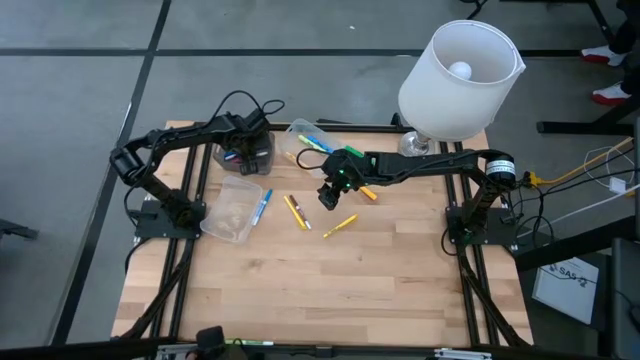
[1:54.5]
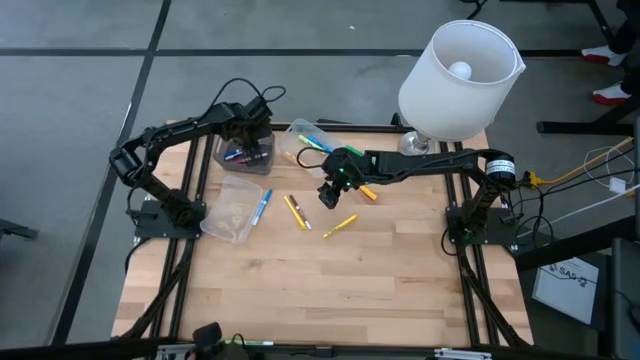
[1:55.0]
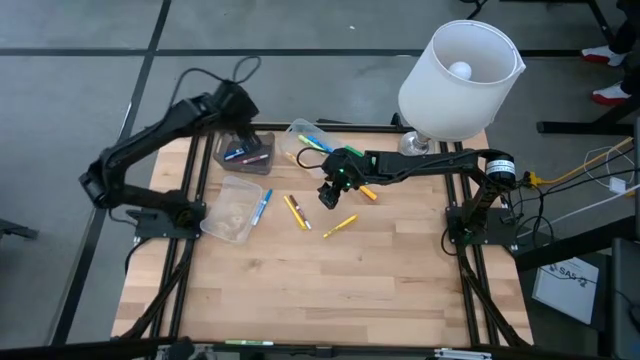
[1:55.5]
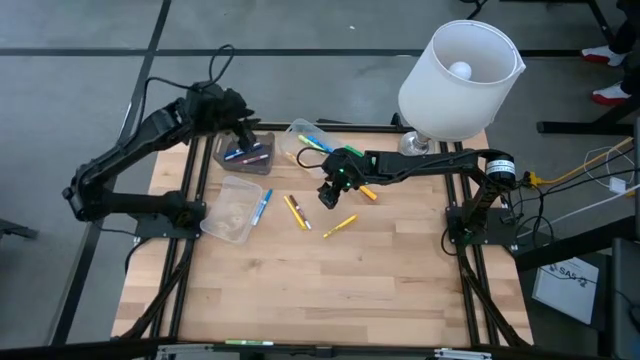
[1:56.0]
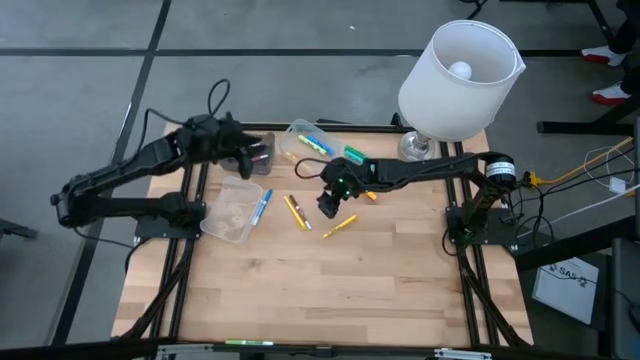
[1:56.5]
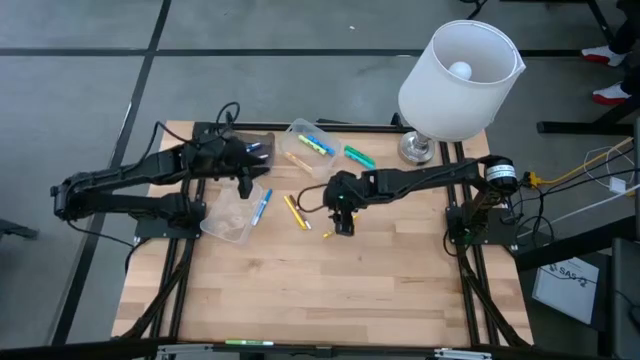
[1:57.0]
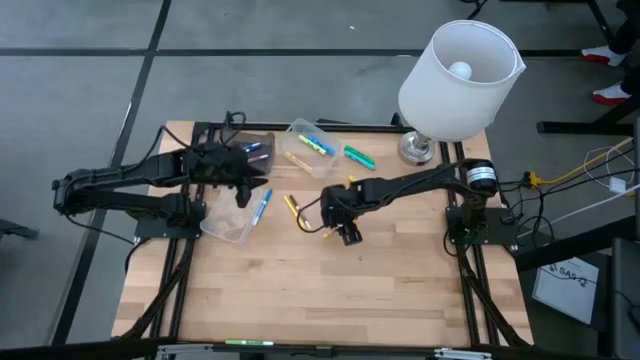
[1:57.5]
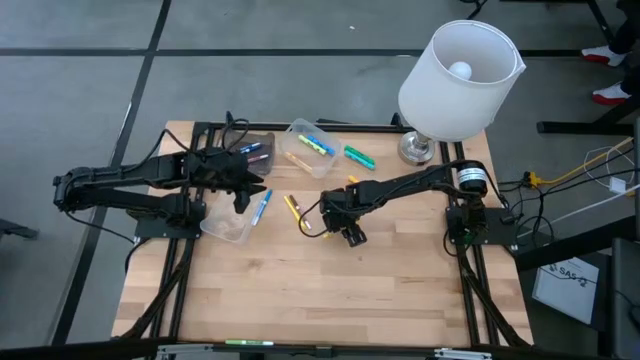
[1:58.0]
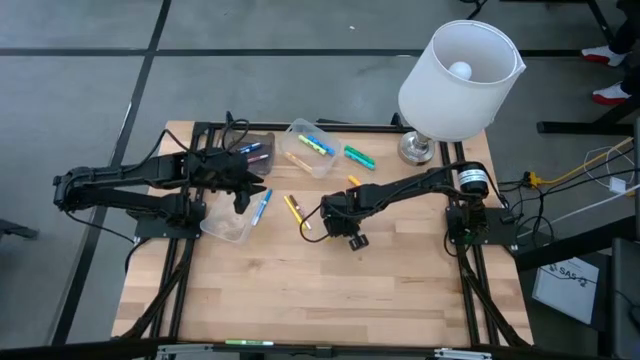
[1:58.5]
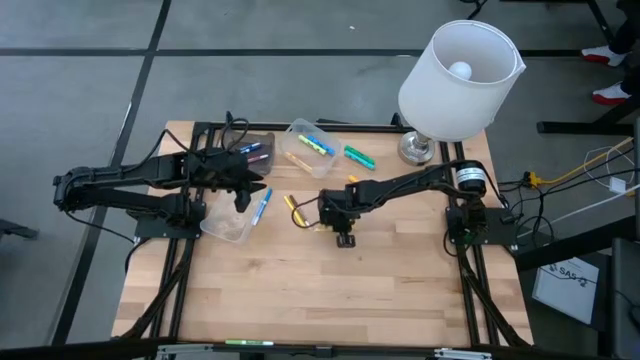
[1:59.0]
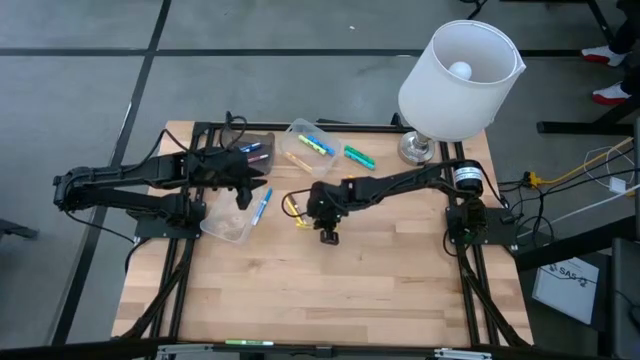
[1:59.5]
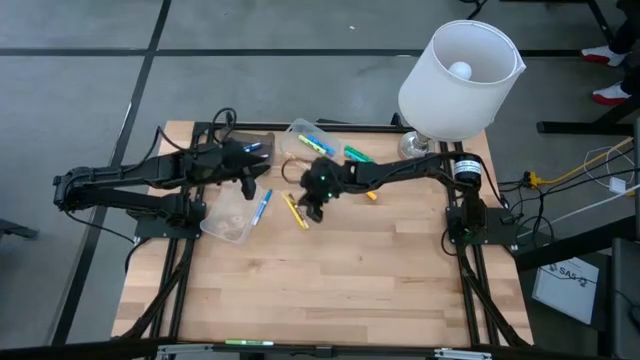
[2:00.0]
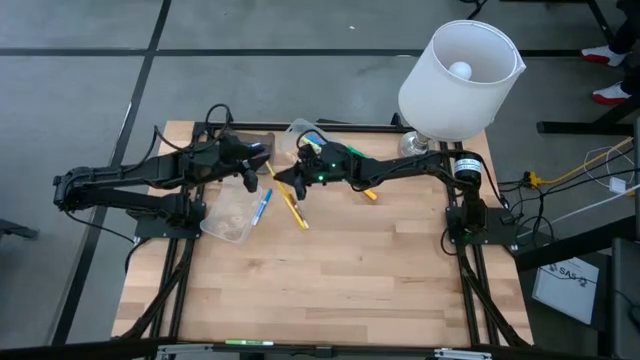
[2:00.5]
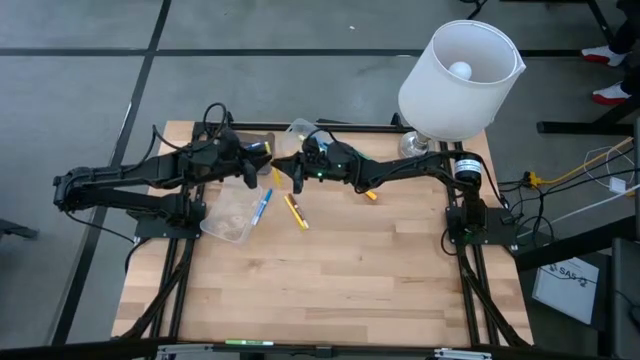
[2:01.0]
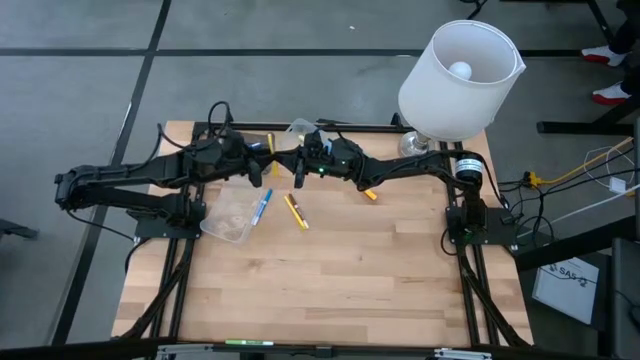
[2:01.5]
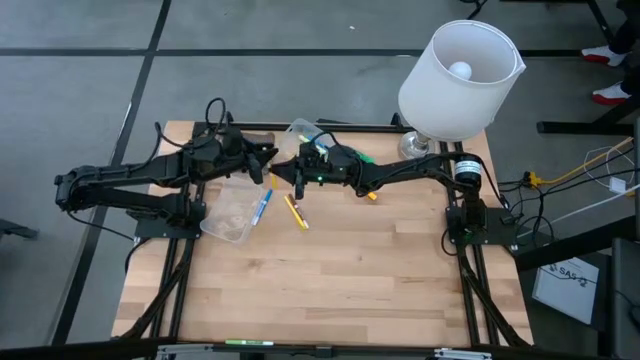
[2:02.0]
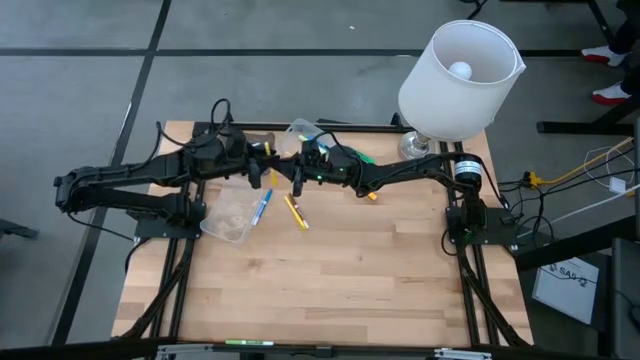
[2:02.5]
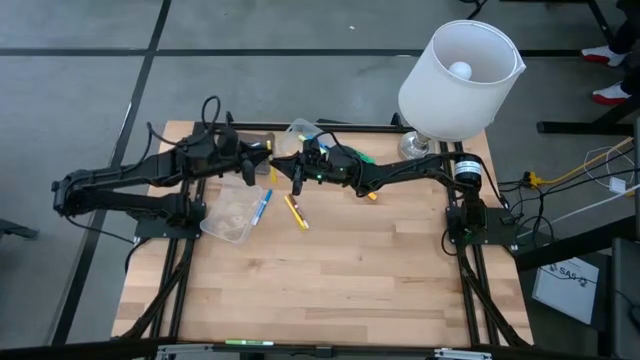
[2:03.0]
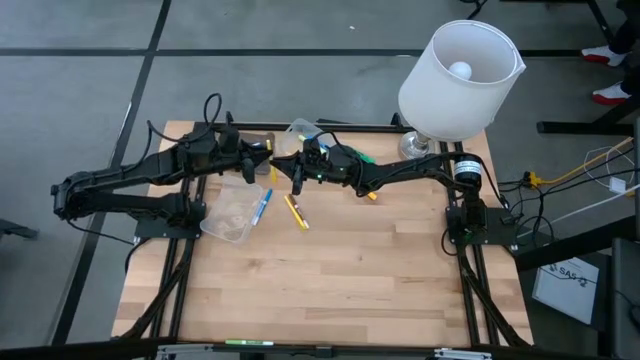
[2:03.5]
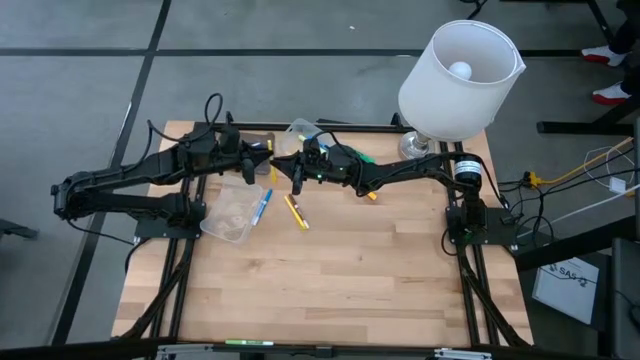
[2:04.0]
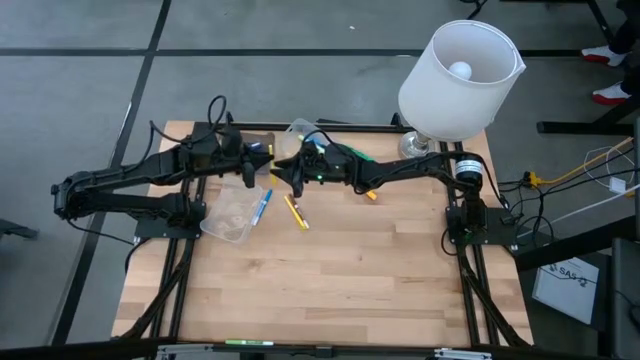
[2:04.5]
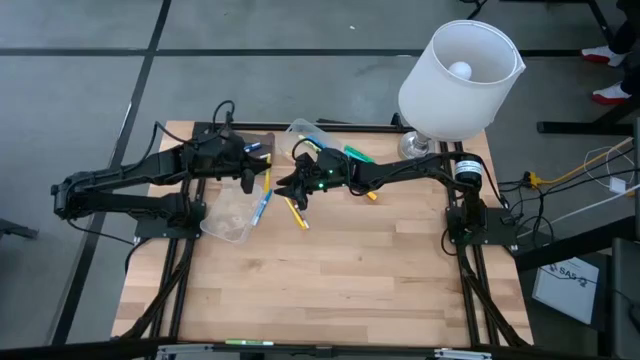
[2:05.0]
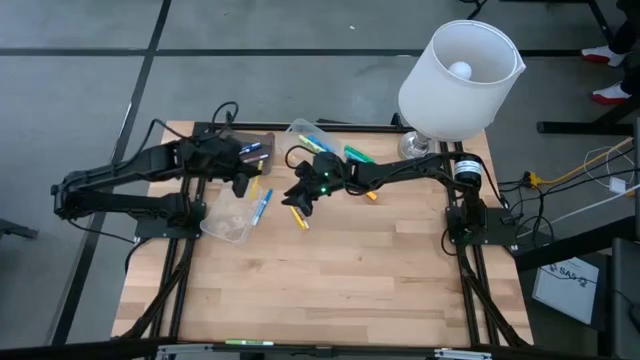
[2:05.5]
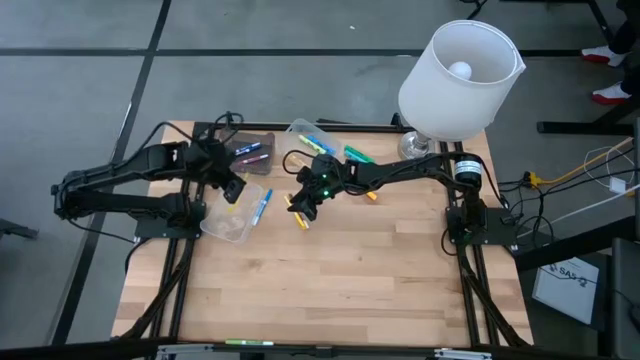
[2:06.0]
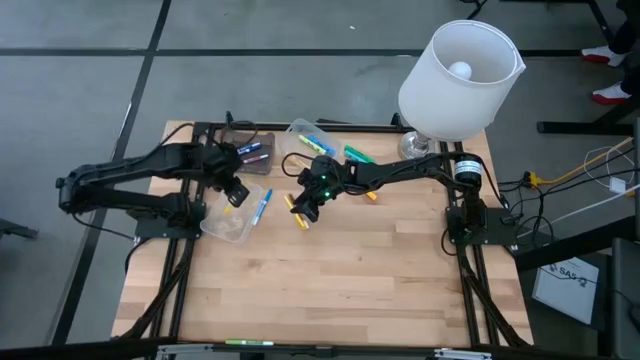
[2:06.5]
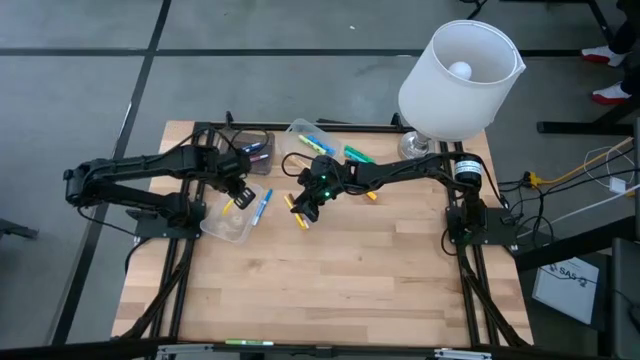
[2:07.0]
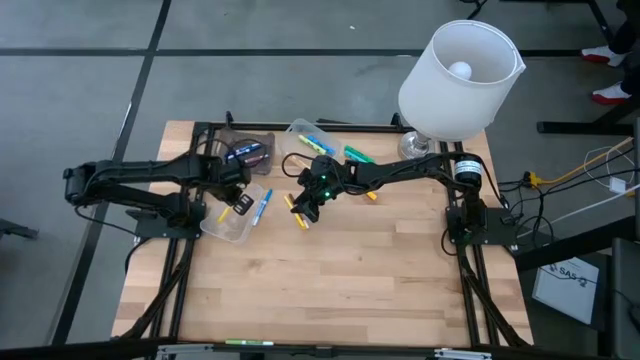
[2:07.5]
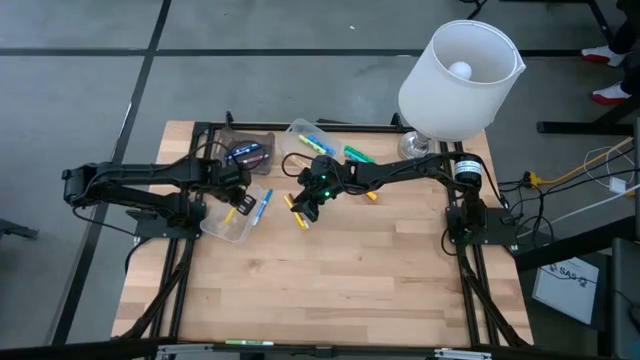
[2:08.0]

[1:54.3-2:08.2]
Task: Pick & Place Markers
Put the yellow pen into the bottom transparent bin

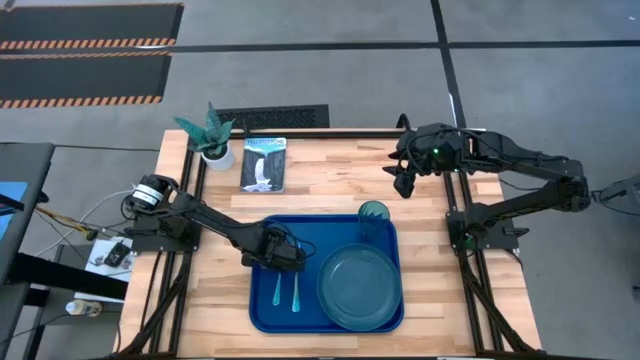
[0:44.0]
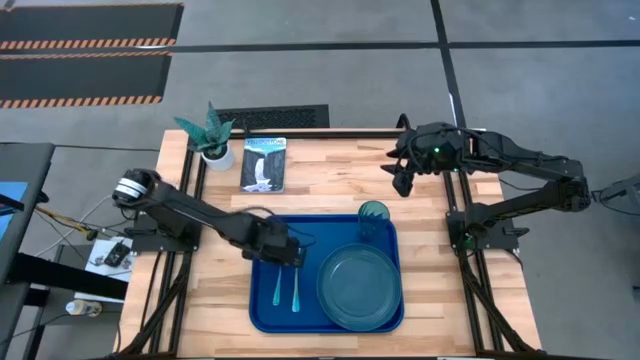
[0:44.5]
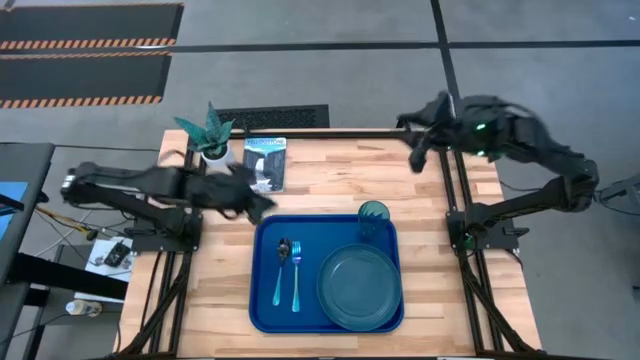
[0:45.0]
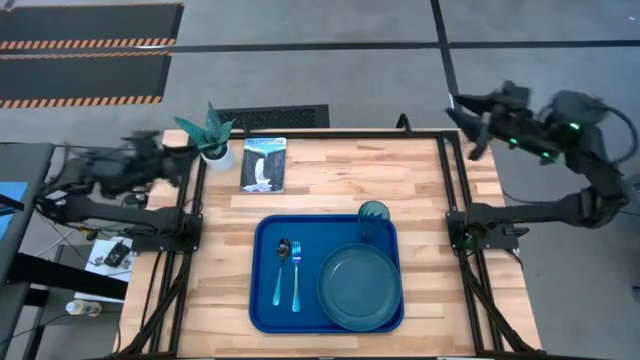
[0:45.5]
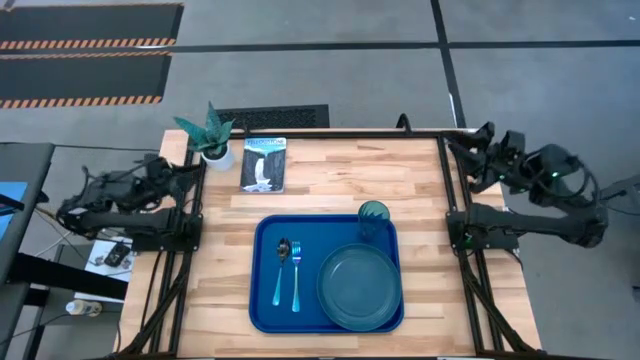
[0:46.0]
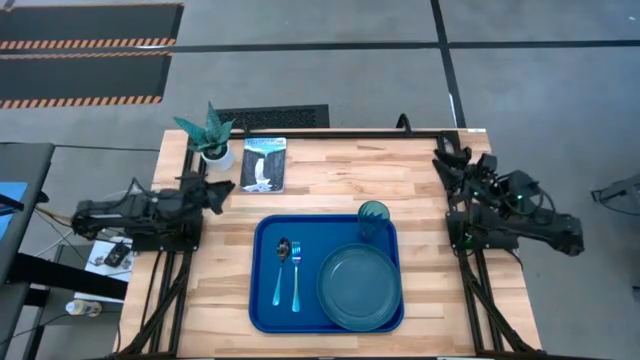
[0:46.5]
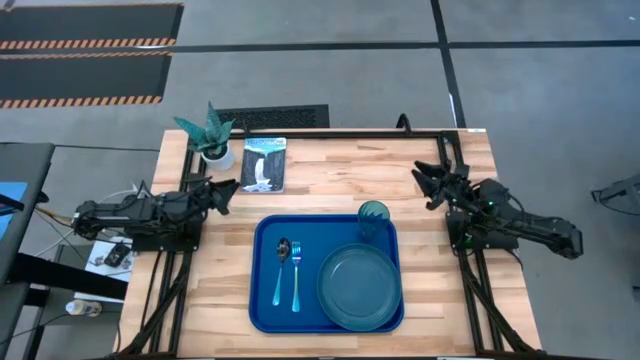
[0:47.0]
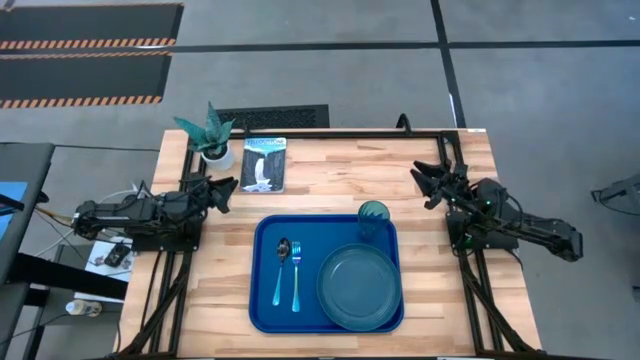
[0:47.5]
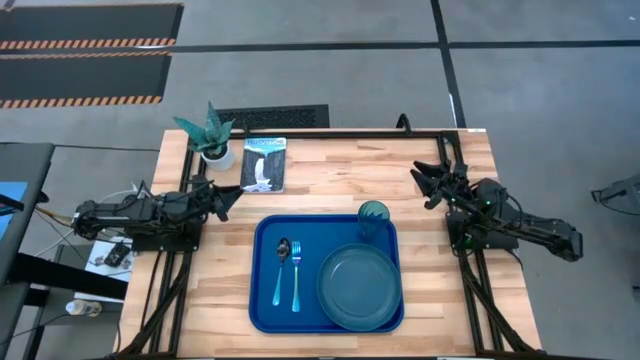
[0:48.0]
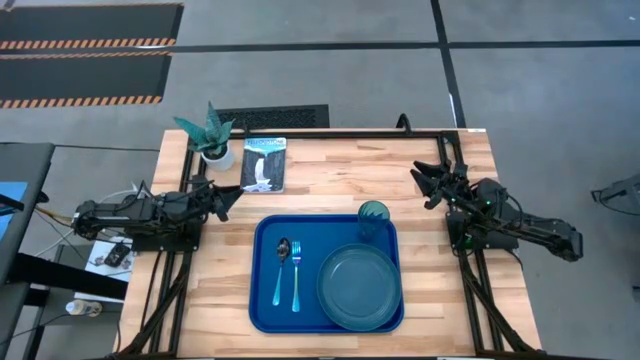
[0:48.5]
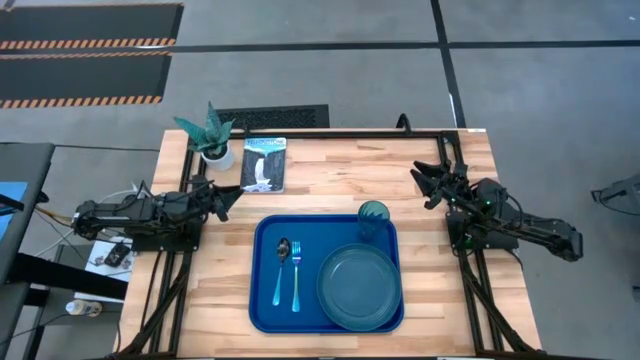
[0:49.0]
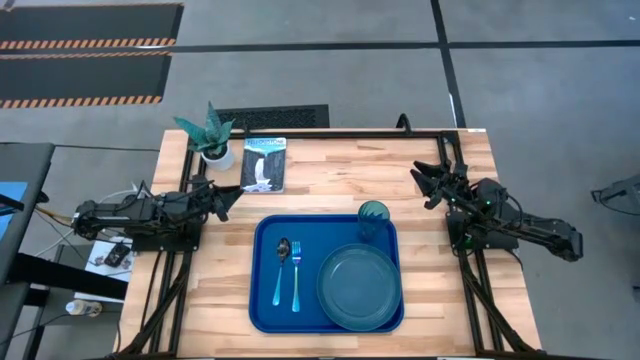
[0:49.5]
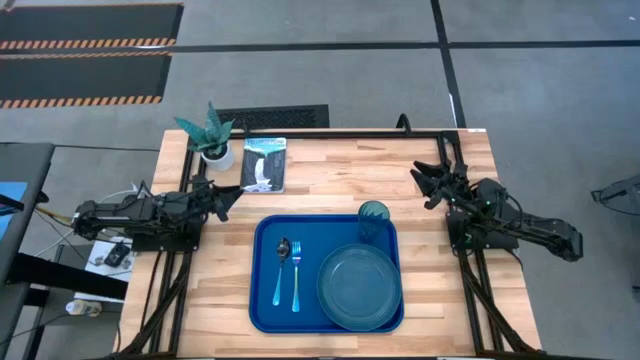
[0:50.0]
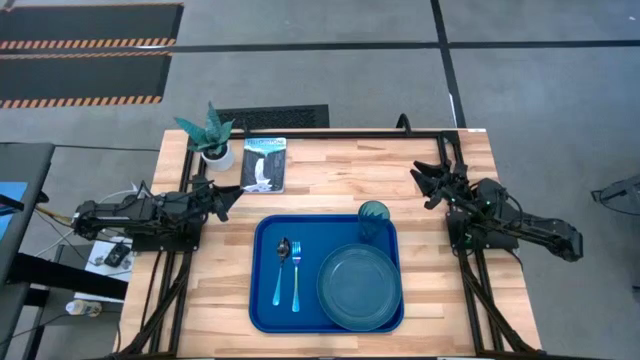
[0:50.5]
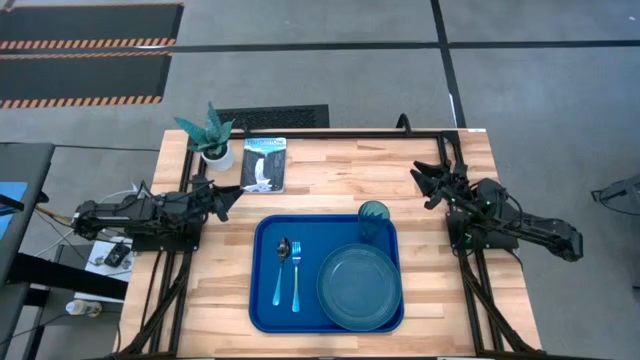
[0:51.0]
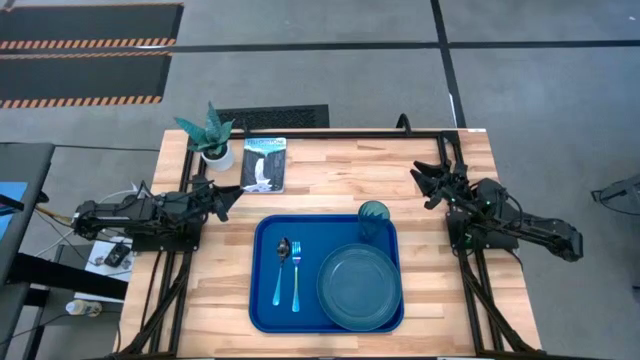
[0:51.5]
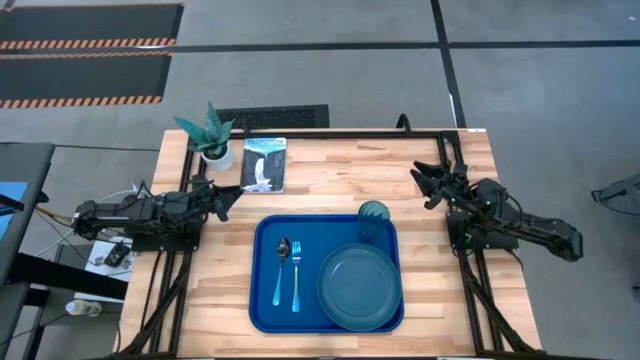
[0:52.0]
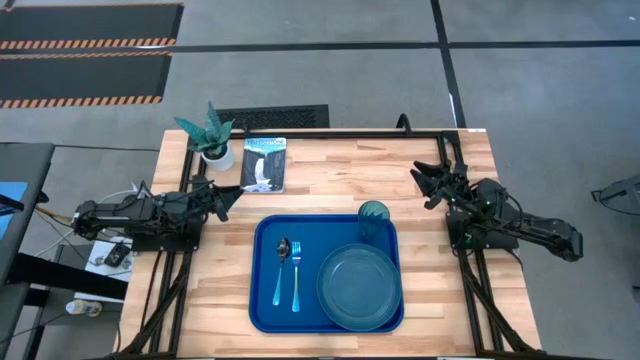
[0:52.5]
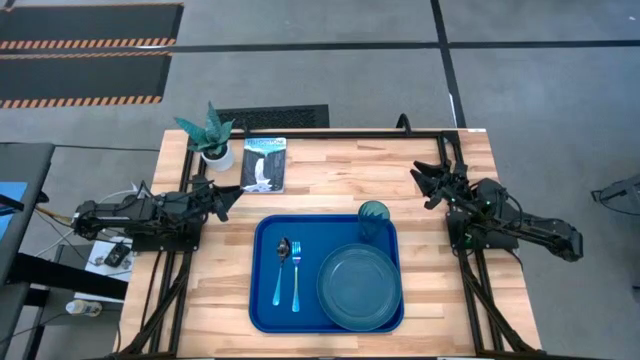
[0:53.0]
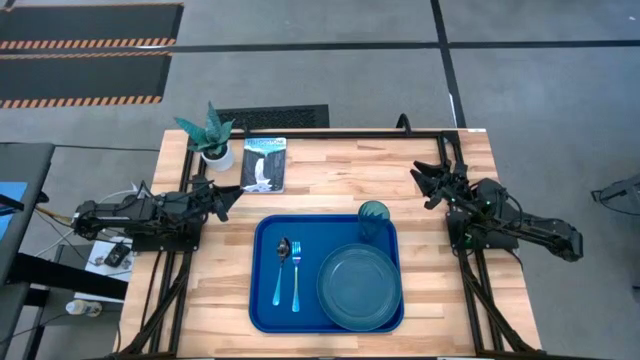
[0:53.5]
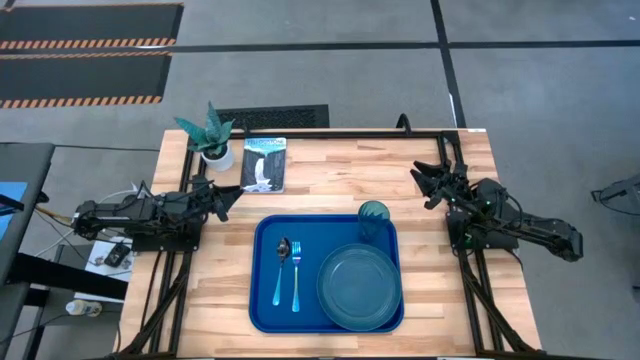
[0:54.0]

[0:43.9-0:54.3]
Task: Pick and place plate/cup/fork/spoon on tray
Return to Home Position
